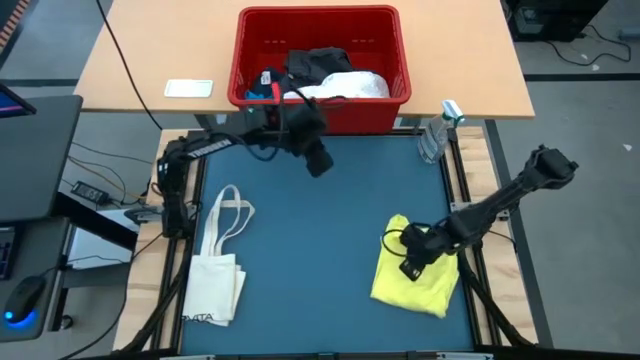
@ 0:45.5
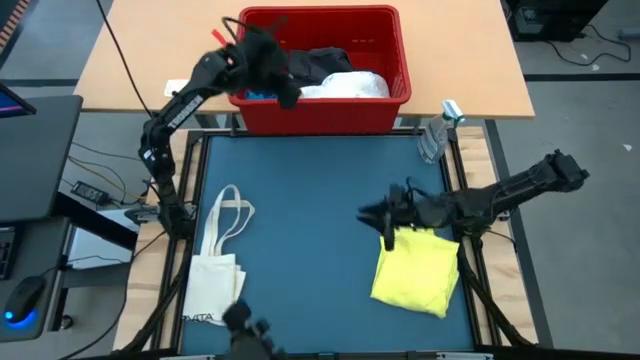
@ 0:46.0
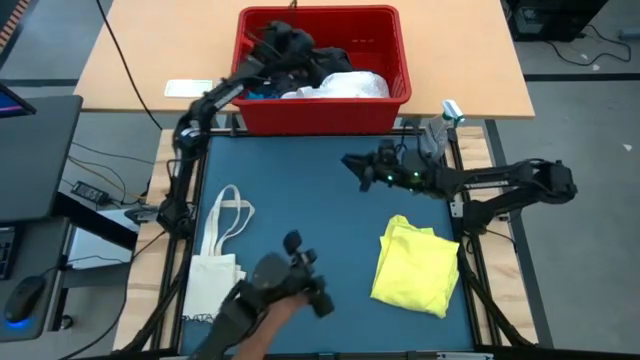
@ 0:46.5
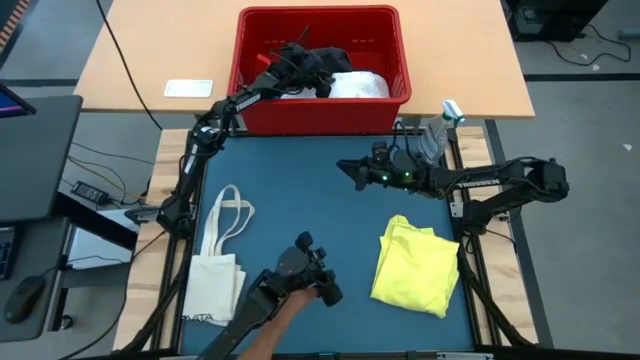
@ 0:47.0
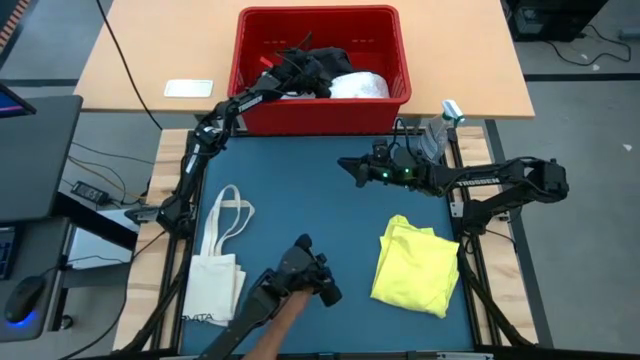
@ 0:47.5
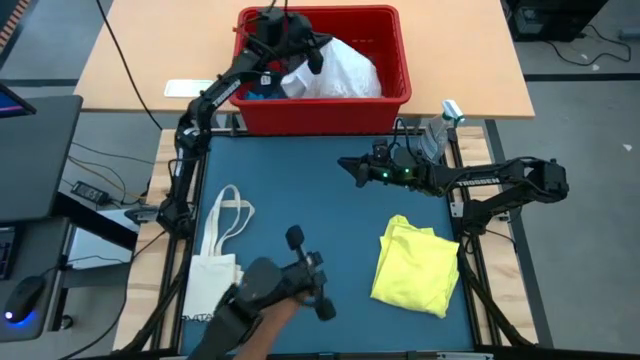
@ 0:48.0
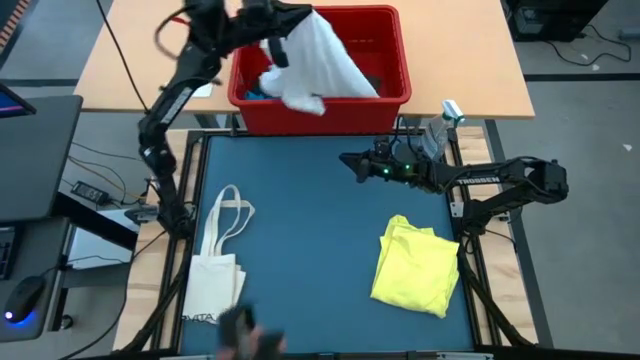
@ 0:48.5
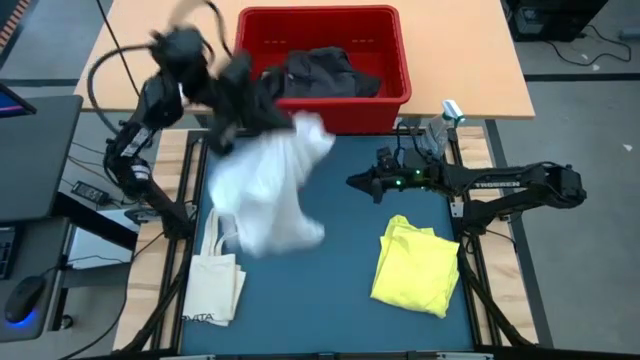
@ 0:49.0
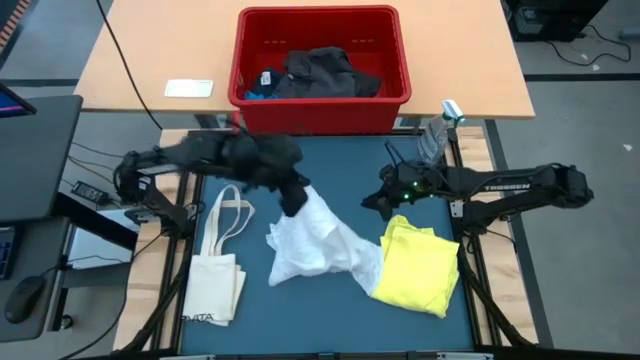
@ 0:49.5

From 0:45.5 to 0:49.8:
Task: Fold laundry
Remove the white cloth from the red bin

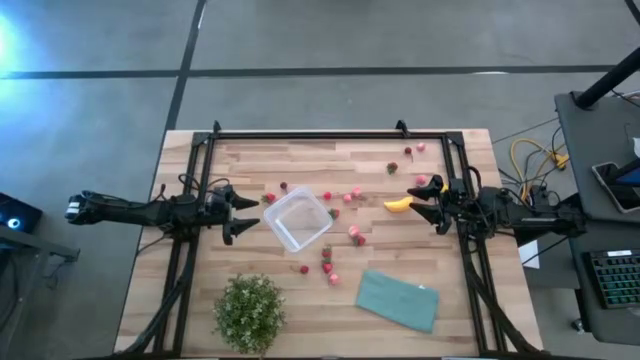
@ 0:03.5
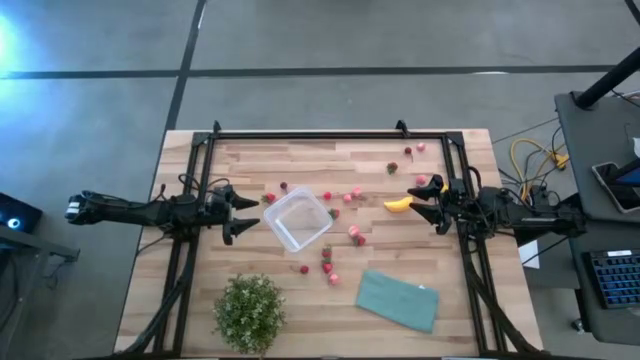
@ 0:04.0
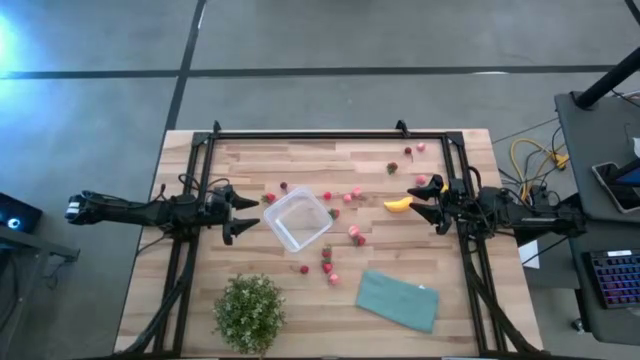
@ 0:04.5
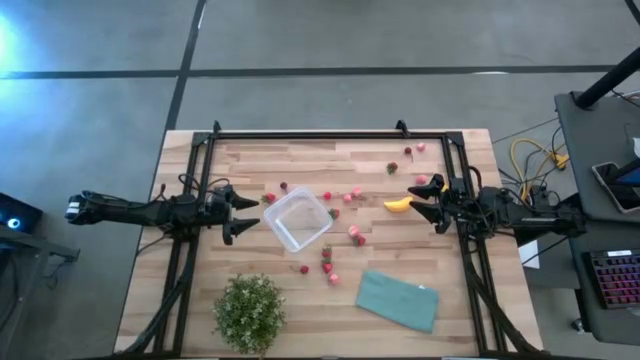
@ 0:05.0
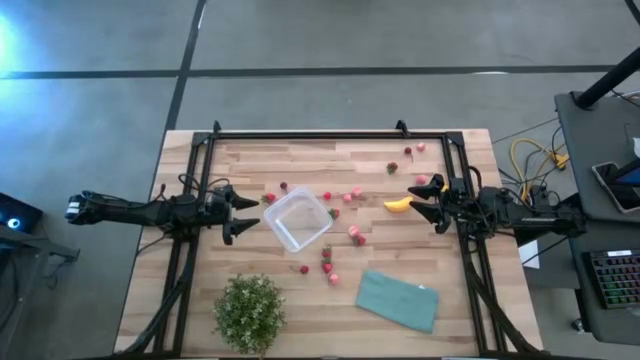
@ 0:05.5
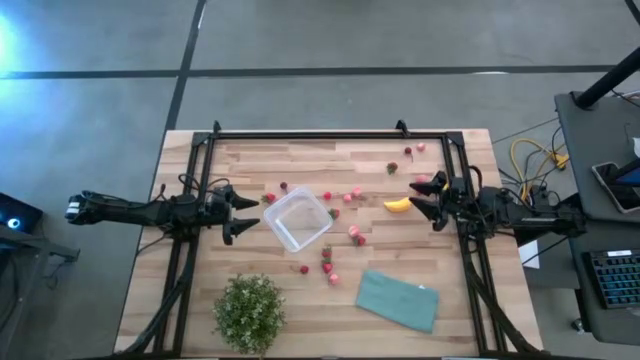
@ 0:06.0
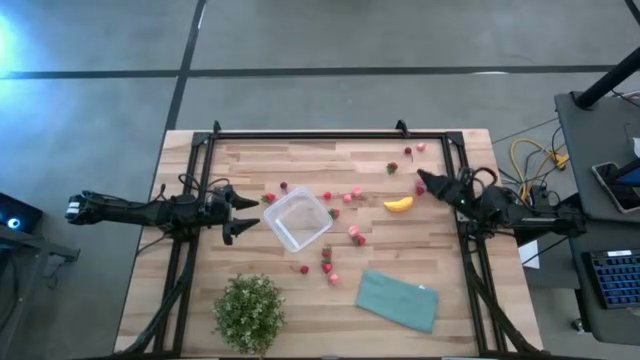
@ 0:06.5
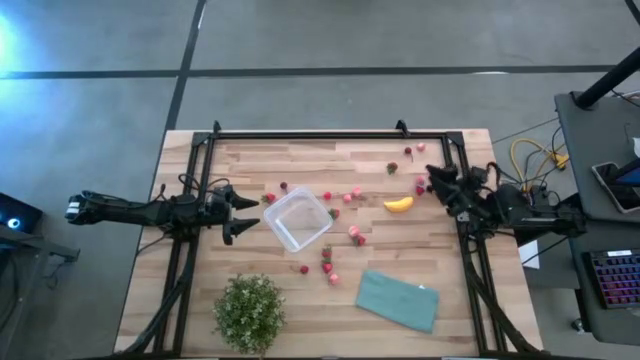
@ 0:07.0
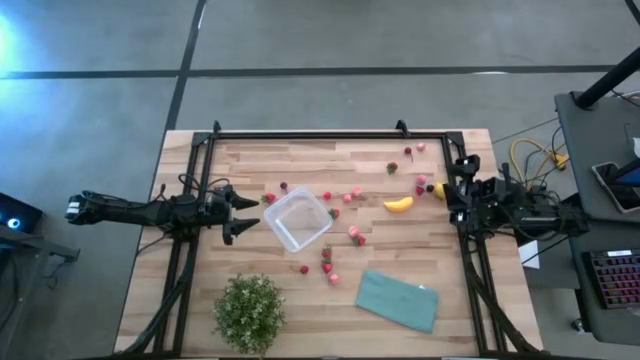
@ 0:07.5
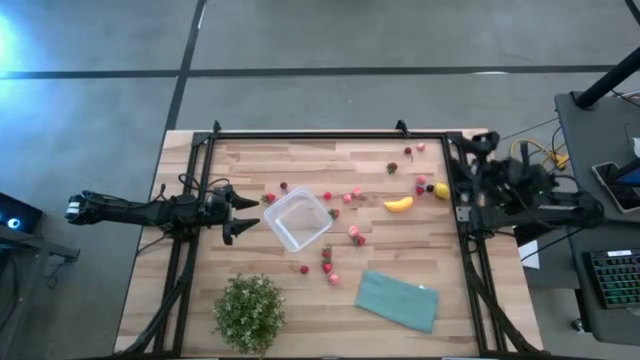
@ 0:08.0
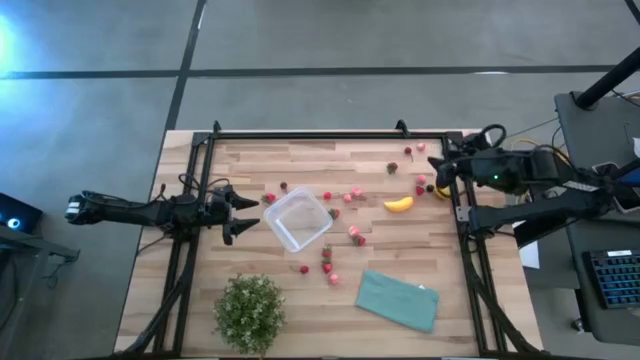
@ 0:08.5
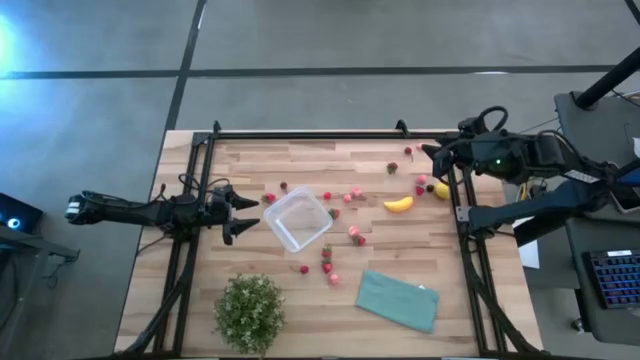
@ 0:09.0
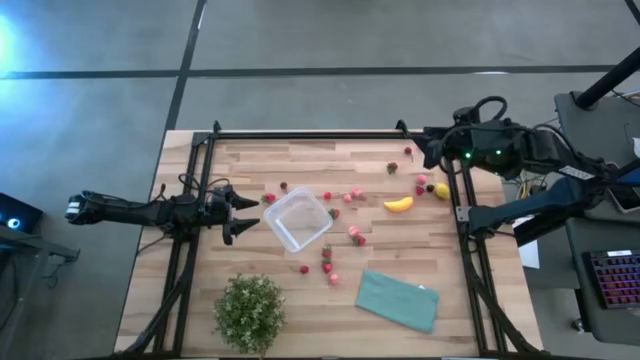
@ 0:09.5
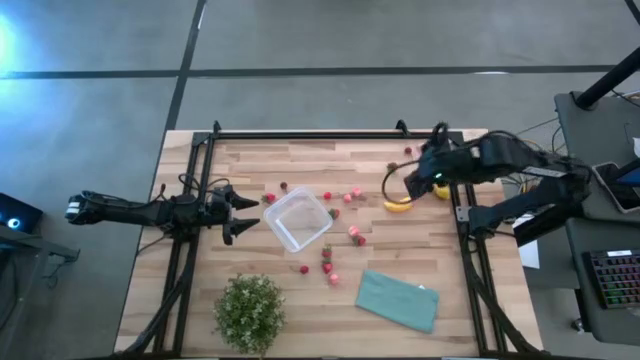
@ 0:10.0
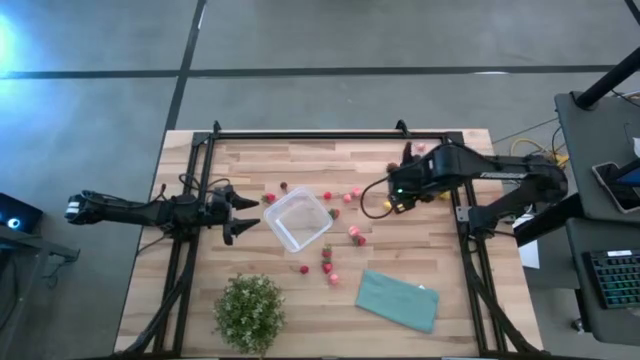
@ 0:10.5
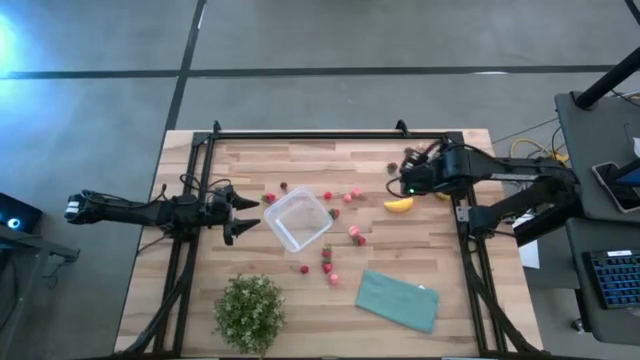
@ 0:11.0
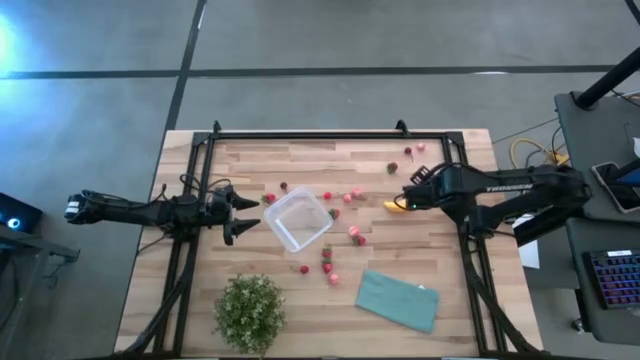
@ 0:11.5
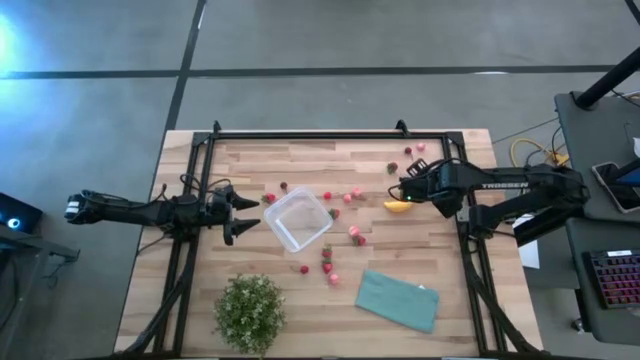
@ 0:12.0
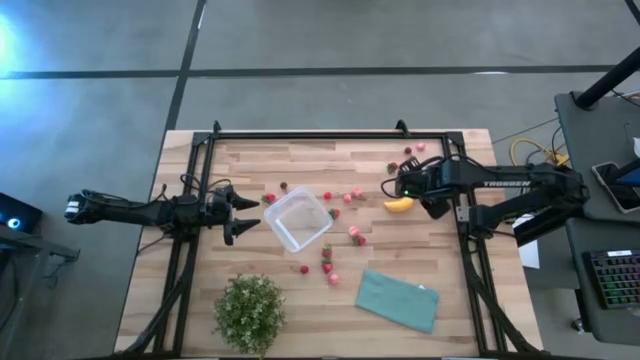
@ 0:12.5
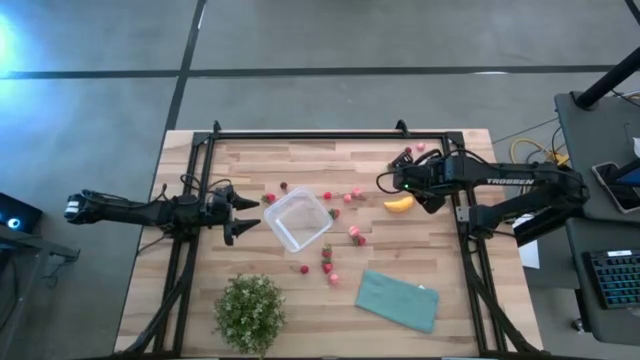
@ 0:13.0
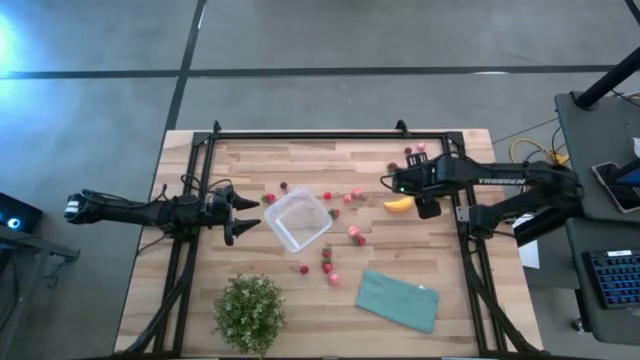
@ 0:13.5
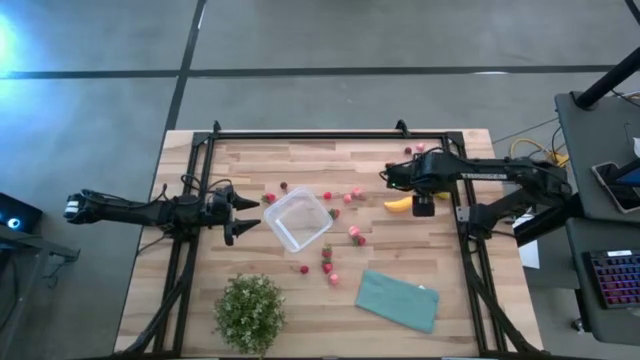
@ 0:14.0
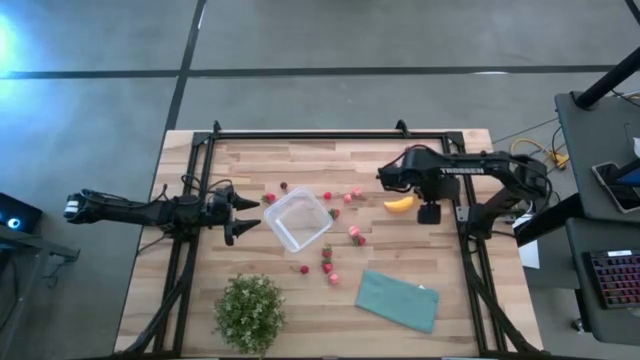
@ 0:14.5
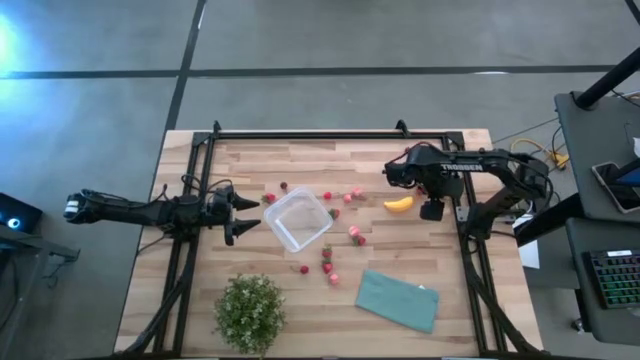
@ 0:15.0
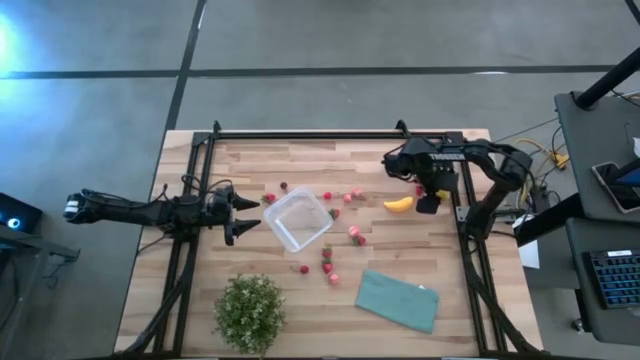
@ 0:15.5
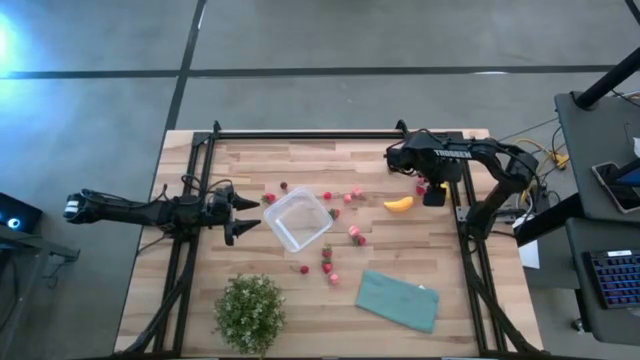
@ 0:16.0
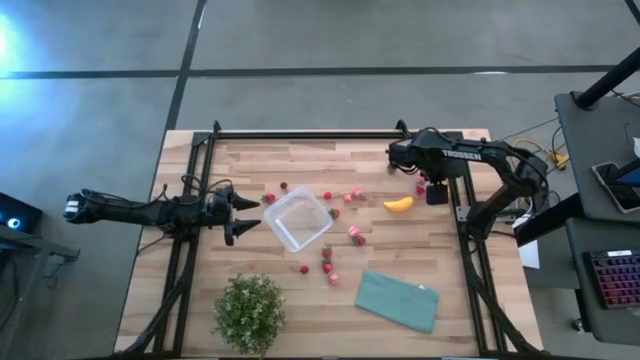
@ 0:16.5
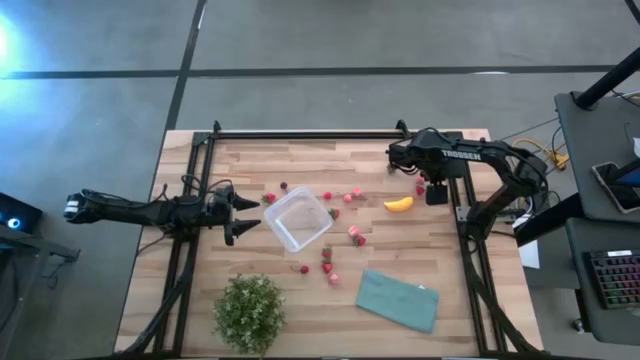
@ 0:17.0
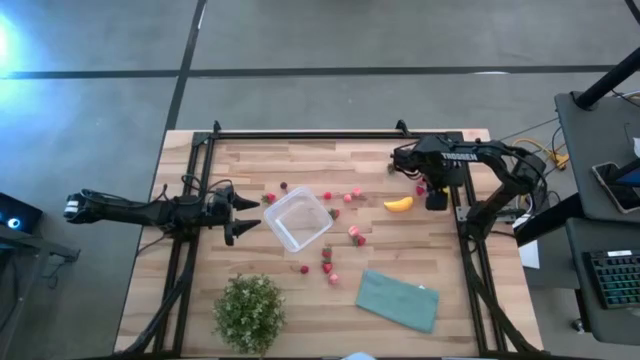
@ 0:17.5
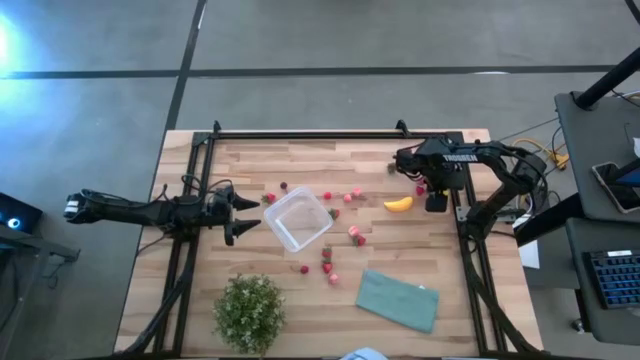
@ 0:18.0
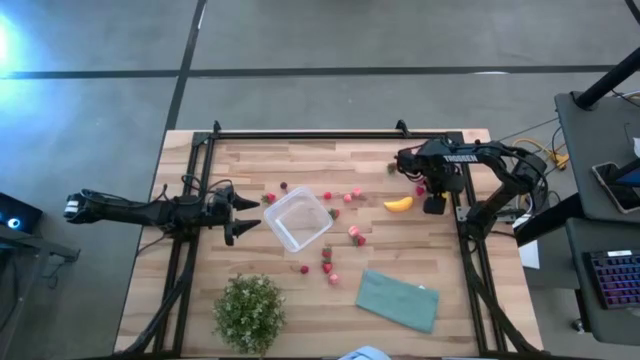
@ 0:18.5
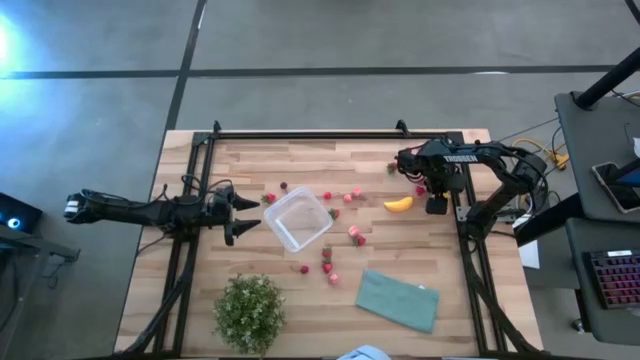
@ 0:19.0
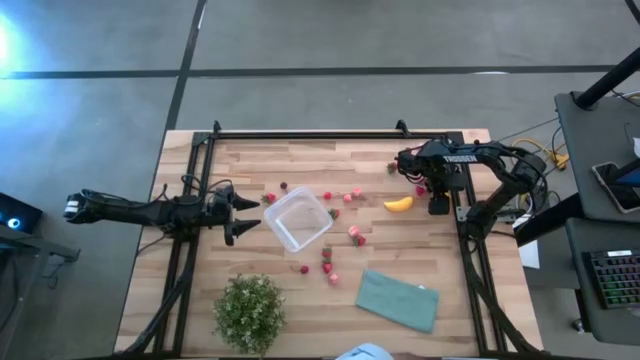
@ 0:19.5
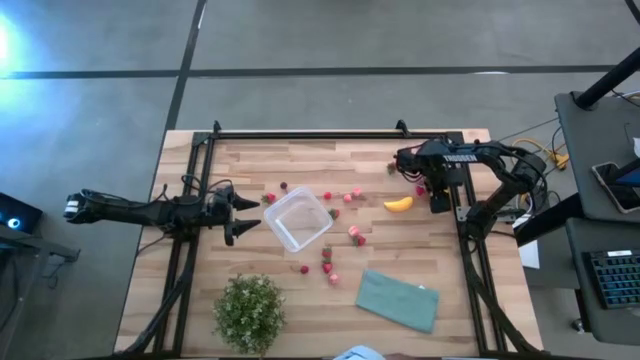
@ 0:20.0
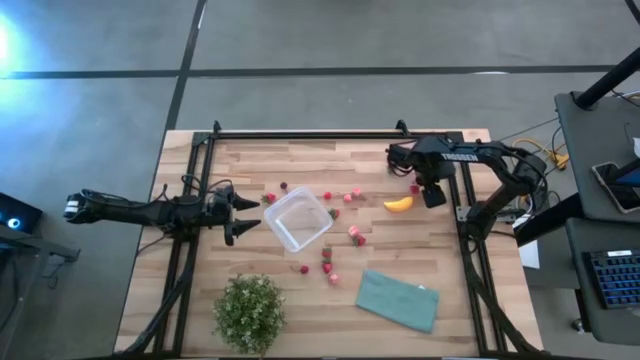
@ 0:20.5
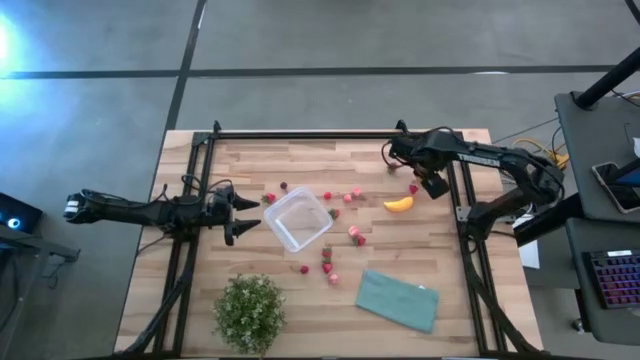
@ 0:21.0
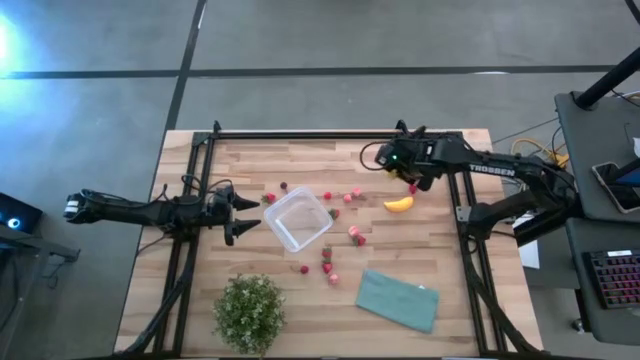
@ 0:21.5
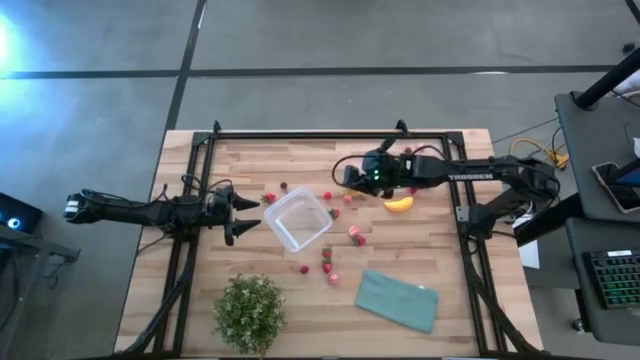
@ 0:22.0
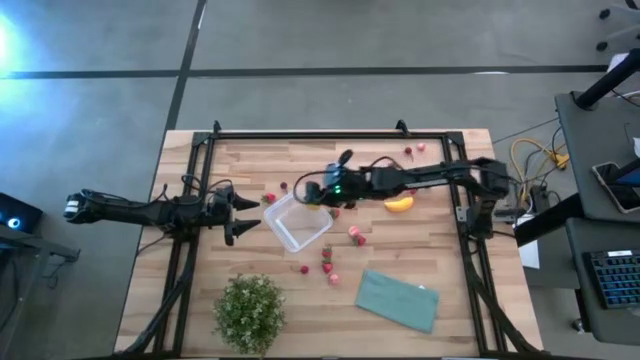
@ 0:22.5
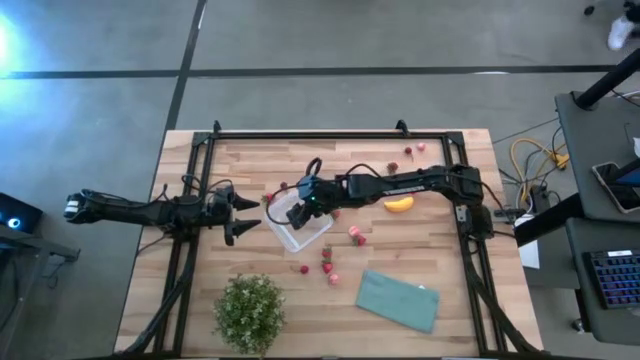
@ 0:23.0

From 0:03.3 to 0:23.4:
Task: Pick and placing Produce into tupperware
Put the yellow lemon into the transparent bin
